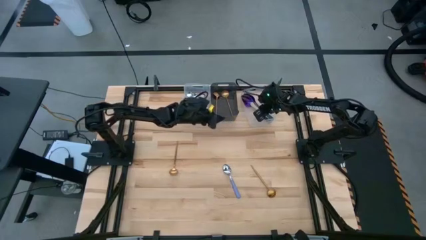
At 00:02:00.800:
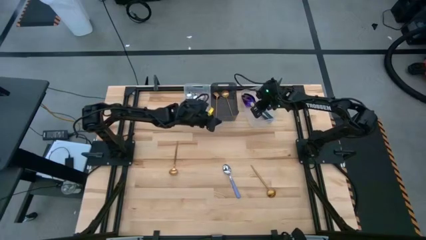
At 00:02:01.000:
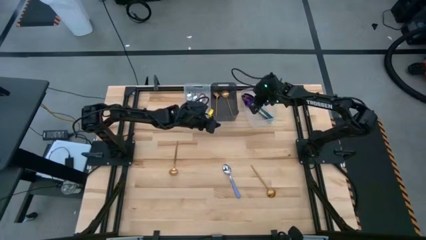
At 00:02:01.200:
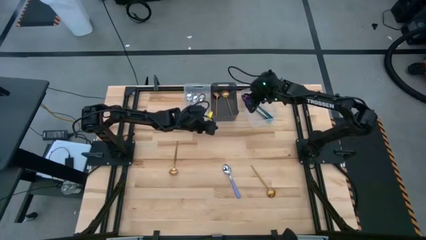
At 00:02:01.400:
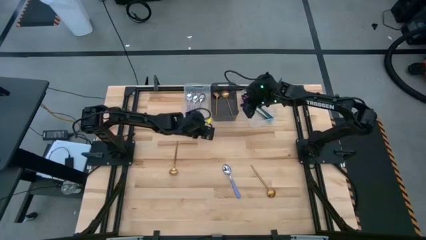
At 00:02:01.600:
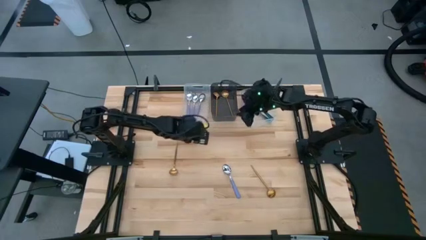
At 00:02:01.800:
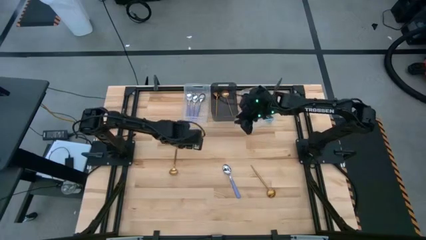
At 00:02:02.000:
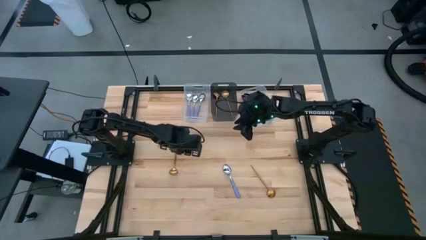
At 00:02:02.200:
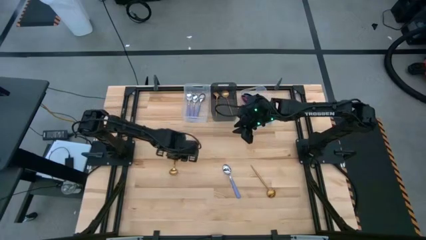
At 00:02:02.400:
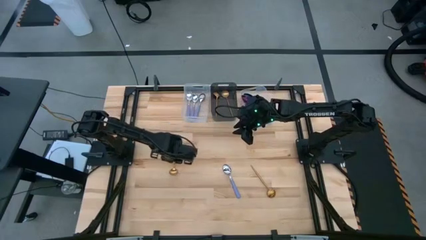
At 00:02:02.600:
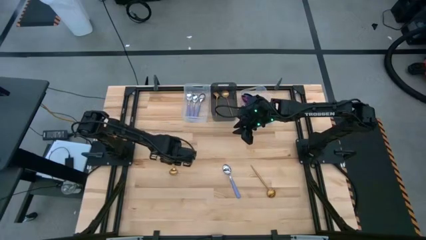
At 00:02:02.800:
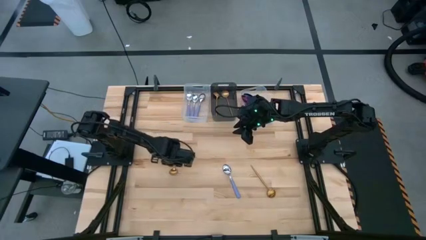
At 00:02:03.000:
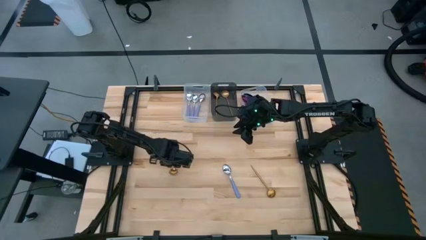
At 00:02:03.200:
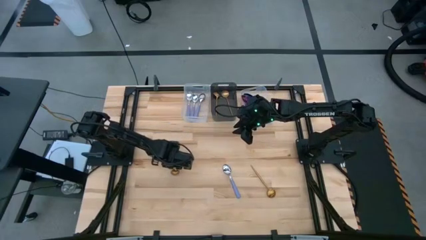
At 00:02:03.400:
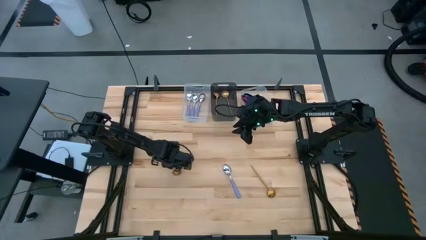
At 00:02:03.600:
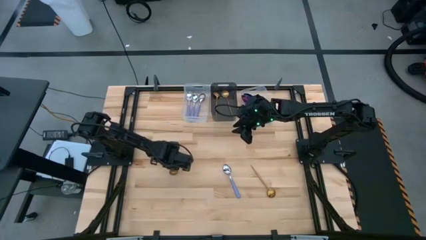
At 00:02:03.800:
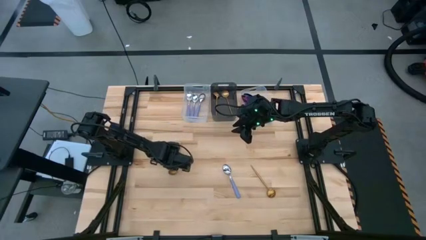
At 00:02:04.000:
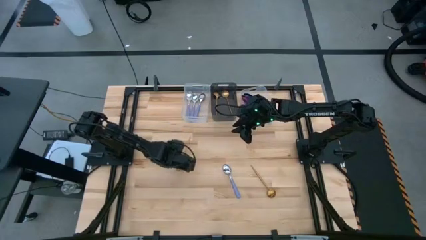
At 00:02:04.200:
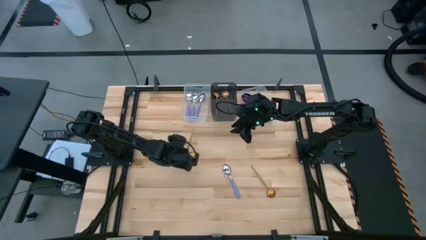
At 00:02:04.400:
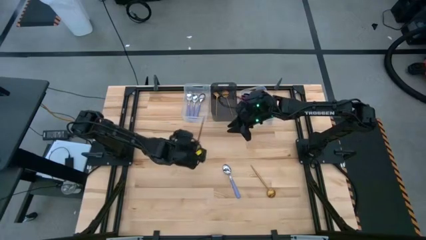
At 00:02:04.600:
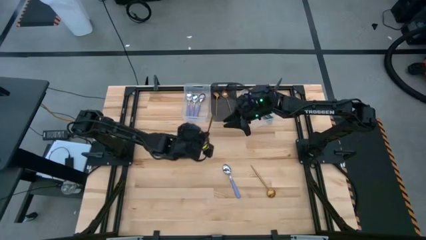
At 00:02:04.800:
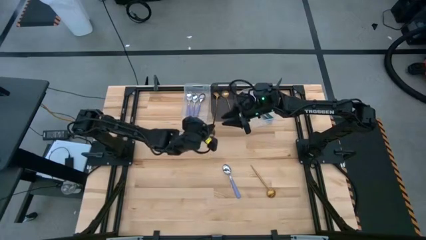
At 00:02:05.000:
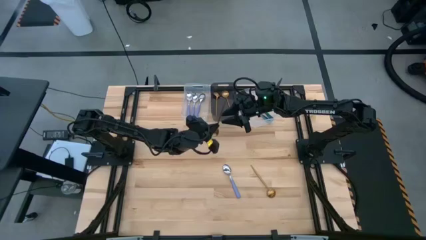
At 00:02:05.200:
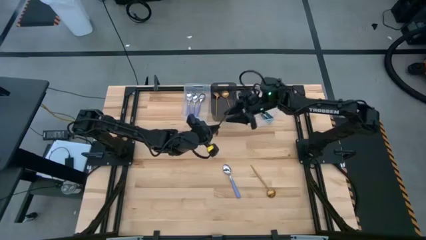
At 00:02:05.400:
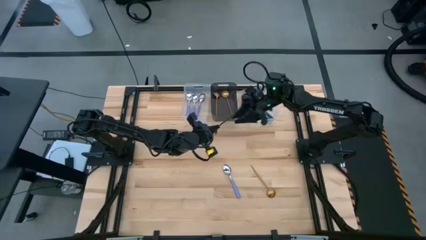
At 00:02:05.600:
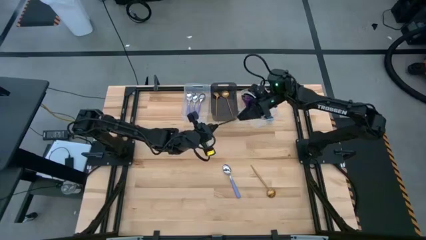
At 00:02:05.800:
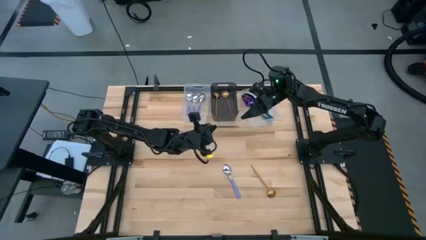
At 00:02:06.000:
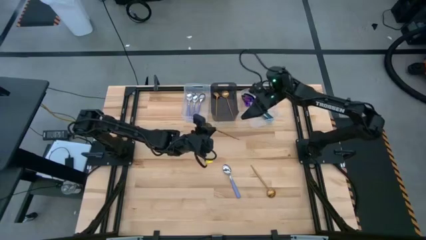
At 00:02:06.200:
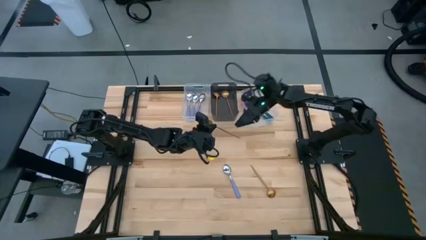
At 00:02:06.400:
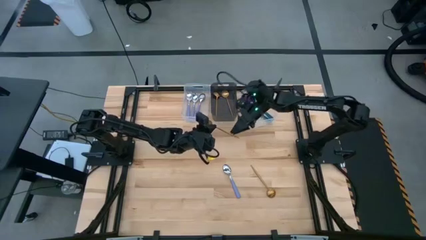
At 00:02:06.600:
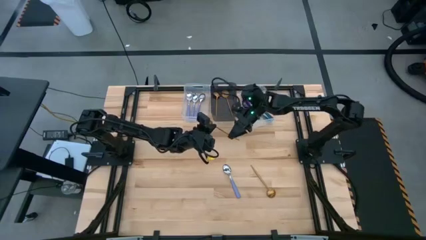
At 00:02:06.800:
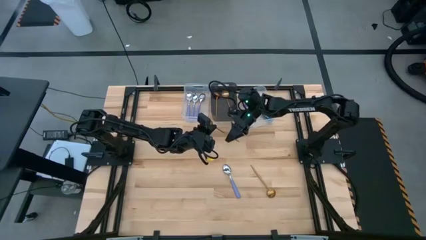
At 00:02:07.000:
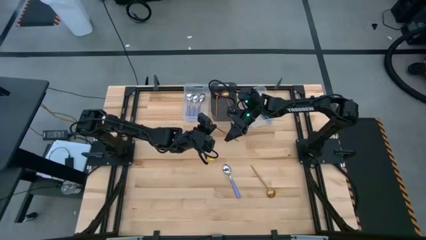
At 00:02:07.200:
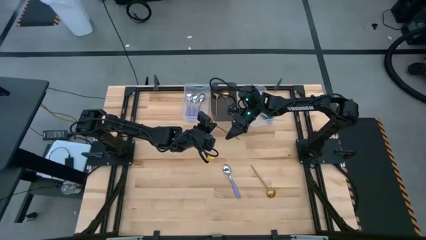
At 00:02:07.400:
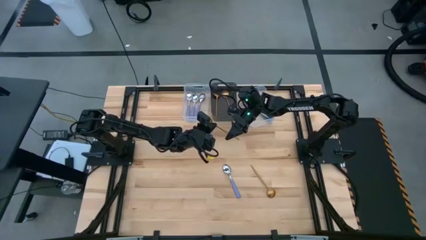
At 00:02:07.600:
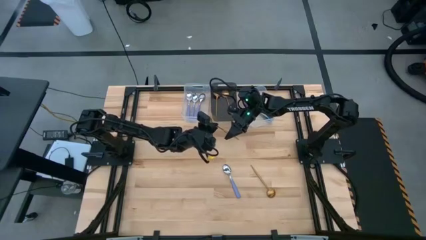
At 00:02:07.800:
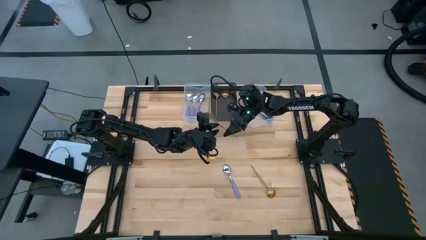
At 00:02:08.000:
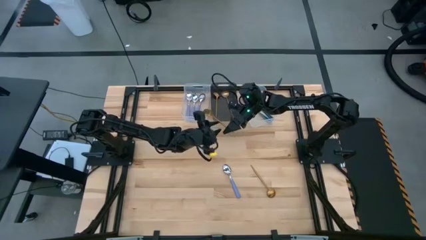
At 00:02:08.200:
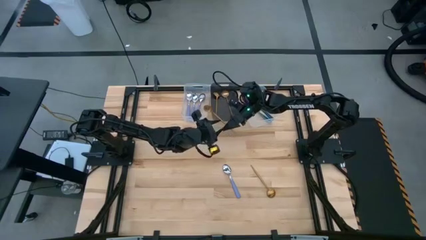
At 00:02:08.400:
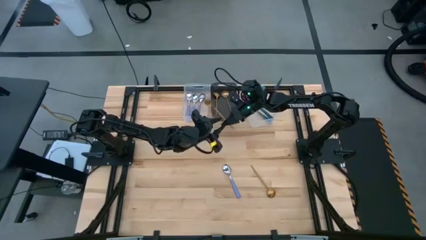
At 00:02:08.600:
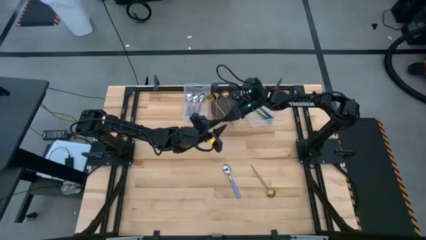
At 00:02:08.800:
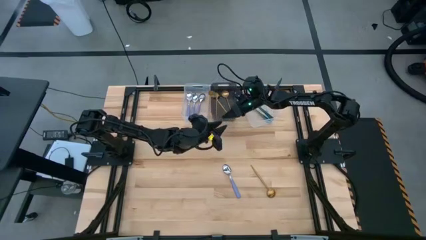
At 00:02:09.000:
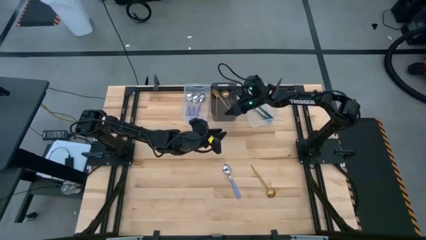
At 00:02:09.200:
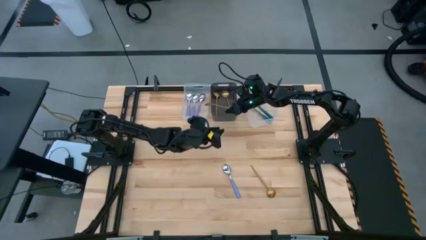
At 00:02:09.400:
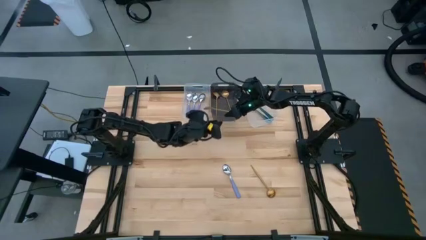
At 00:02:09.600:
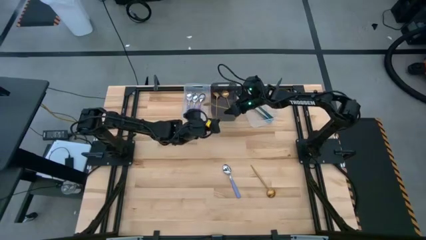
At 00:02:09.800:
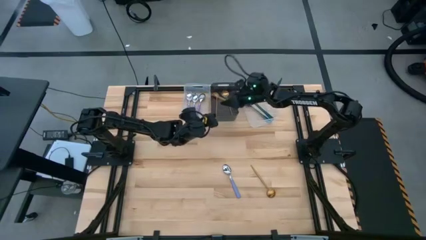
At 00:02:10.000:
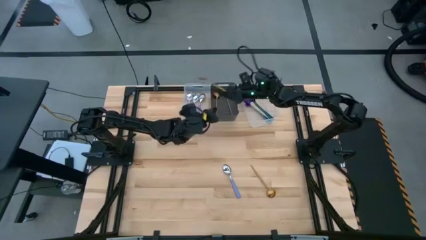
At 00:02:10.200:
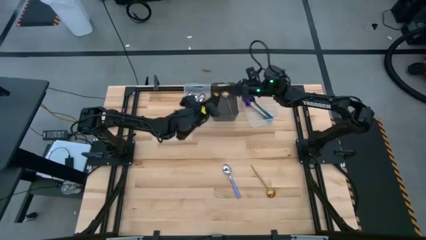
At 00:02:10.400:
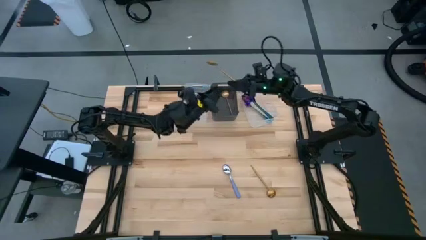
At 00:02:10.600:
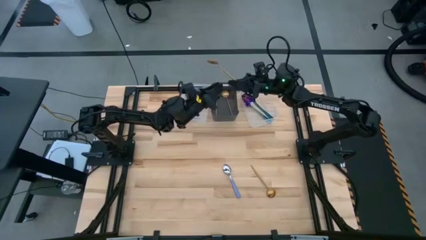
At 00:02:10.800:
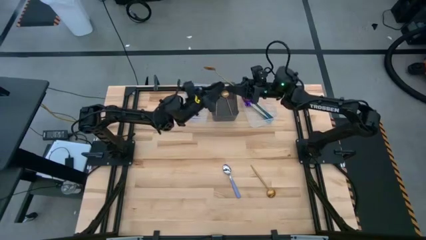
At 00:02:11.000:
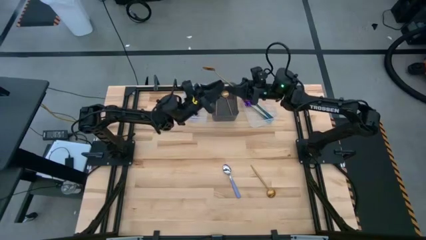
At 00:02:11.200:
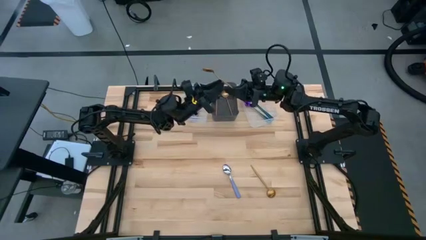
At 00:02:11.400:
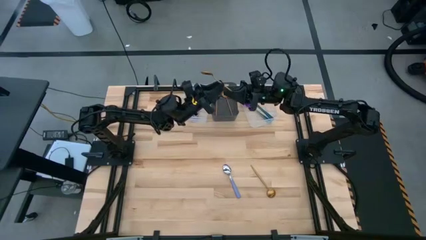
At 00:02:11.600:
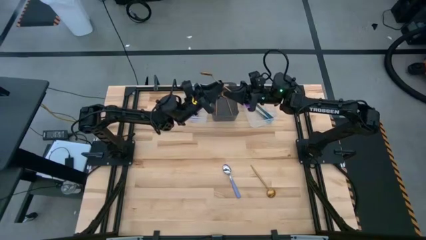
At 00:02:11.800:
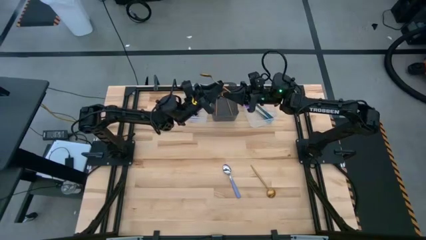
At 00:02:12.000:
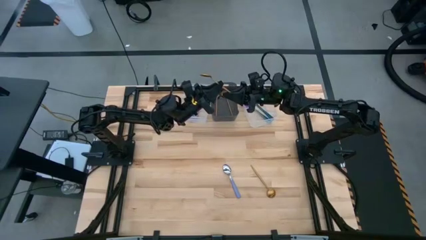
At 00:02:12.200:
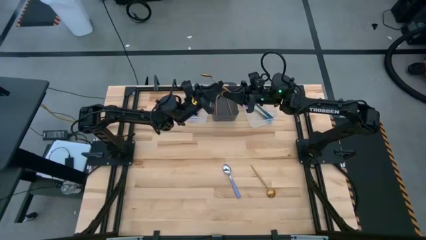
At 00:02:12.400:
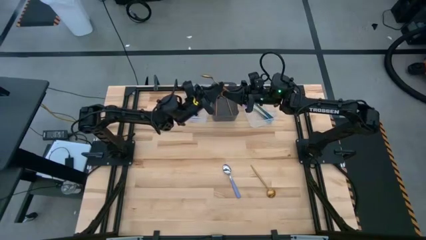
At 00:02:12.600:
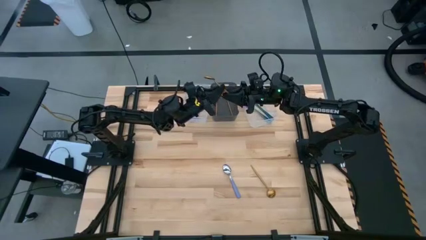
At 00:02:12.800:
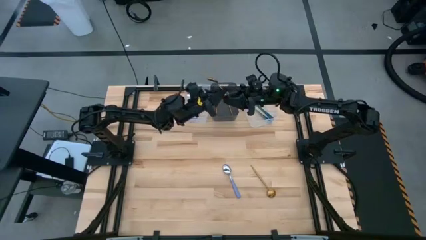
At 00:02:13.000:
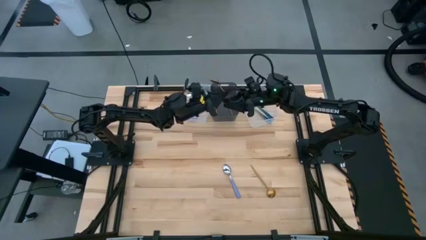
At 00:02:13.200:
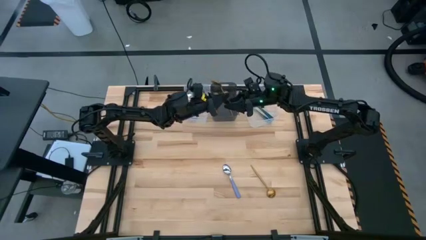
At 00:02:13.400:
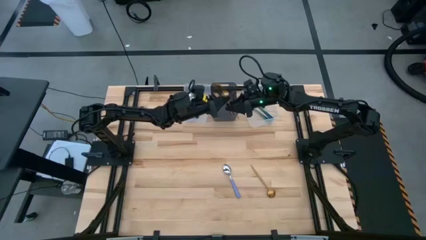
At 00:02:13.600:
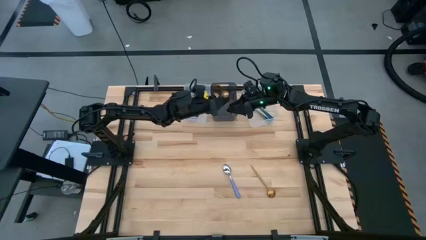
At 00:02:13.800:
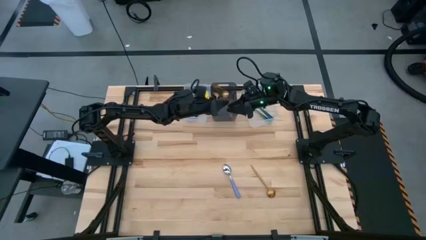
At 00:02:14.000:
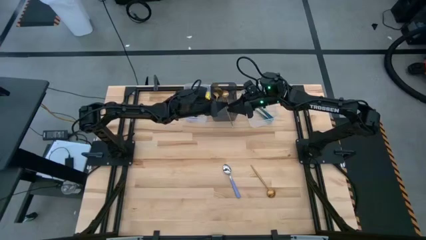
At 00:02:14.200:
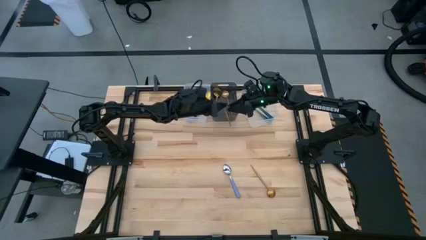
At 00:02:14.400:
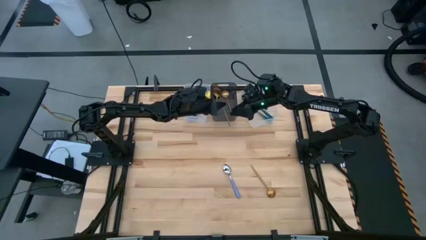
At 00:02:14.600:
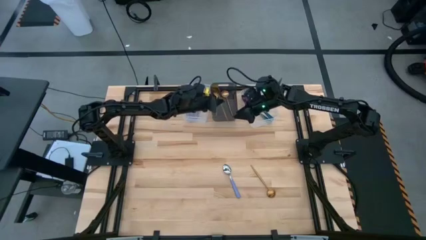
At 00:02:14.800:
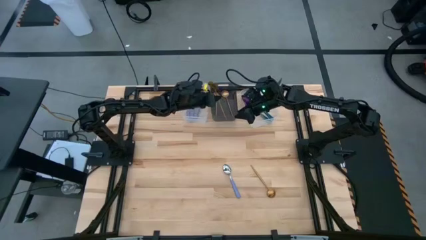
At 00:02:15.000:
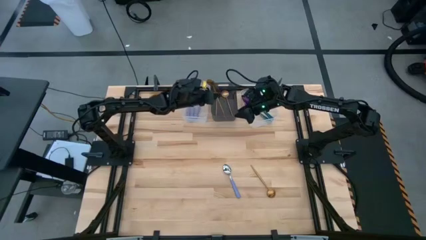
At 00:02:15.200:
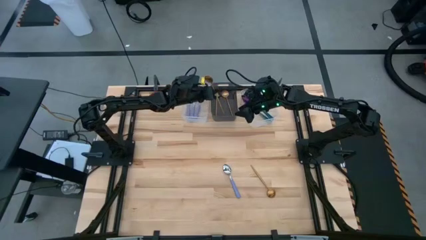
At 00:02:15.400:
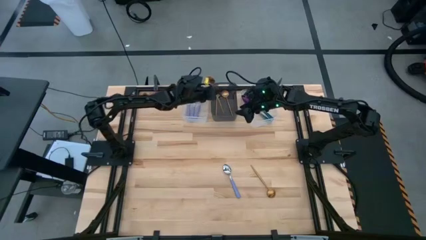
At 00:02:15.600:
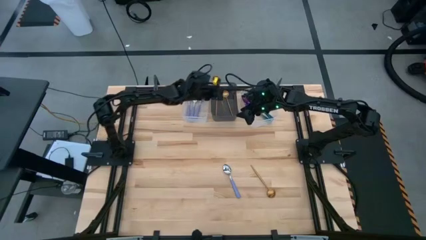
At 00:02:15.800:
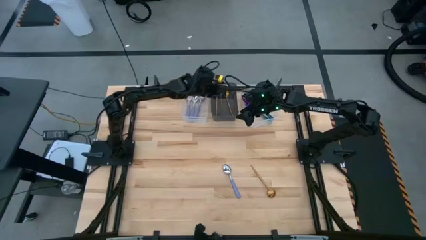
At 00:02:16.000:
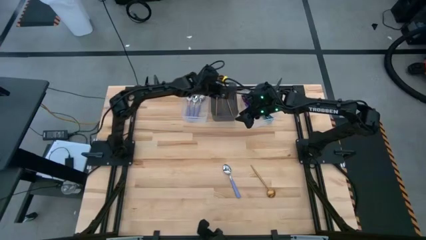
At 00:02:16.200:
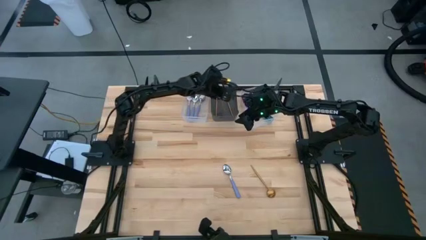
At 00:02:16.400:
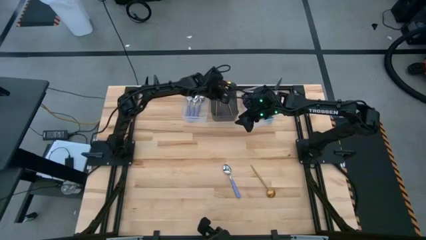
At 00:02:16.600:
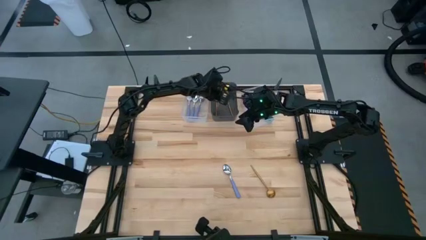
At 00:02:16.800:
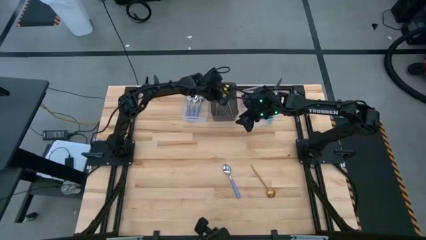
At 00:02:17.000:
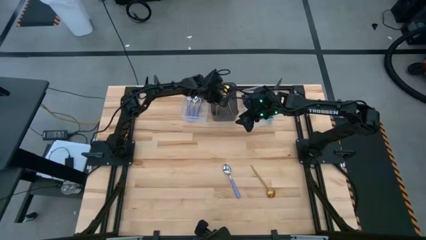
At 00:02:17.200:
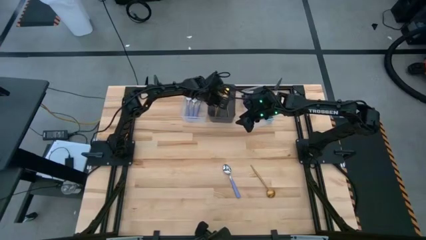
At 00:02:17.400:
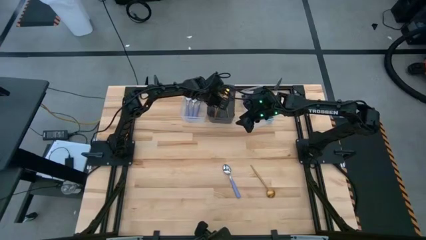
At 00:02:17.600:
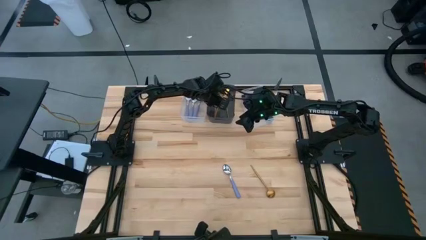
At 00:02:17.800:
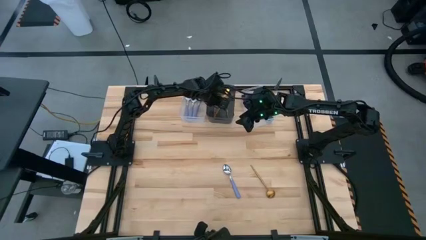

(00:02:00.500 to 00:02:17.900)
Task: Sort silverware by color (type)
Put the gold spoon into the black bin
